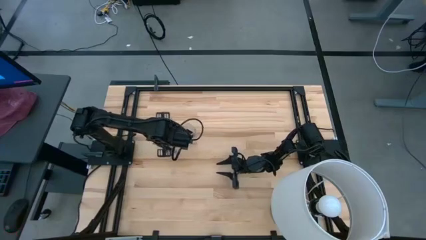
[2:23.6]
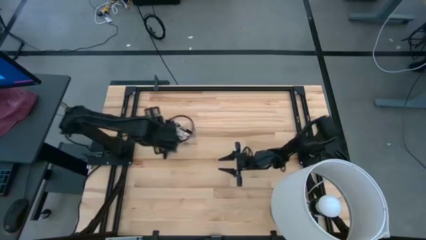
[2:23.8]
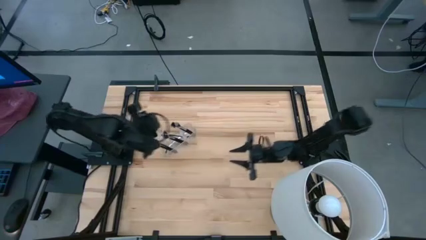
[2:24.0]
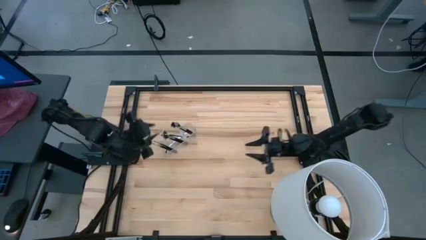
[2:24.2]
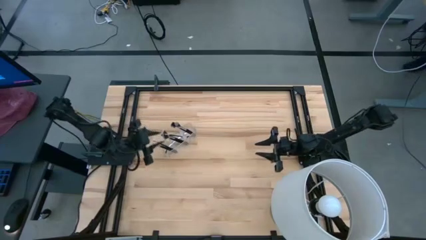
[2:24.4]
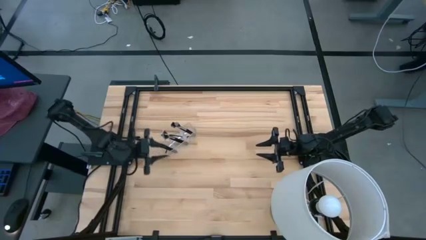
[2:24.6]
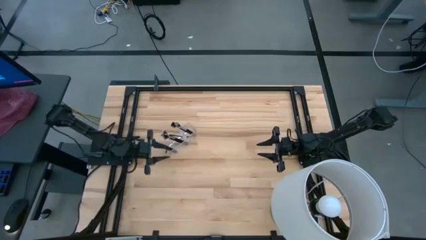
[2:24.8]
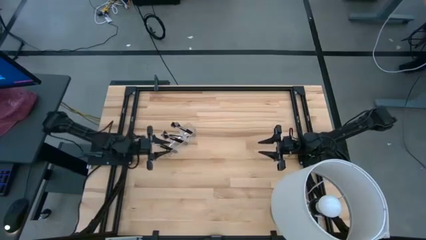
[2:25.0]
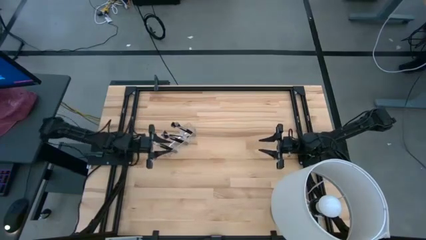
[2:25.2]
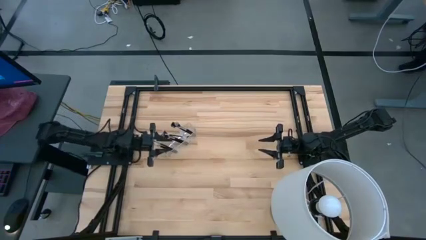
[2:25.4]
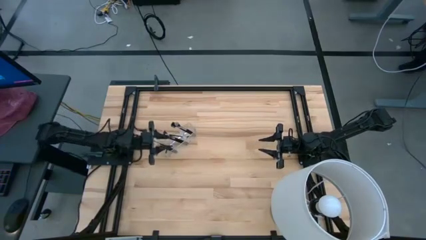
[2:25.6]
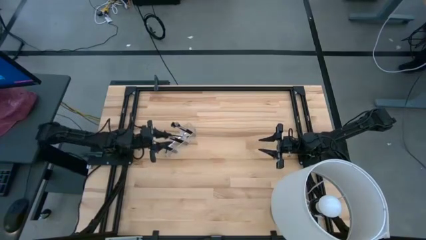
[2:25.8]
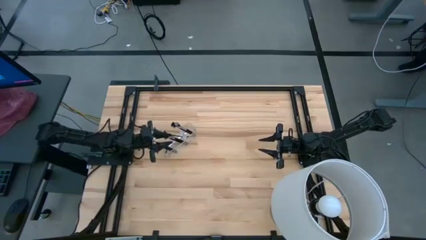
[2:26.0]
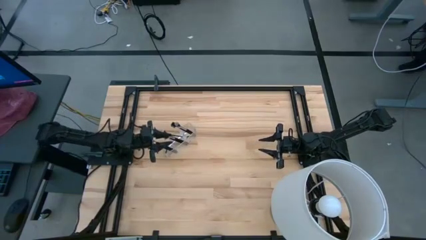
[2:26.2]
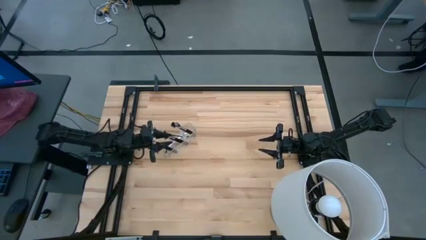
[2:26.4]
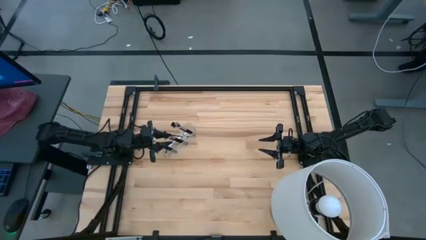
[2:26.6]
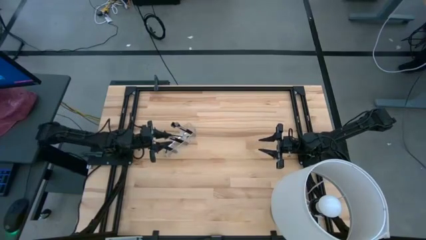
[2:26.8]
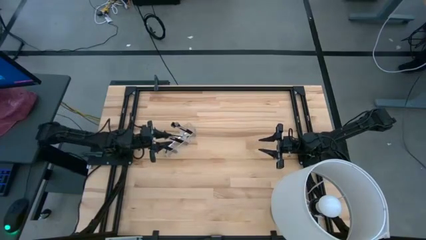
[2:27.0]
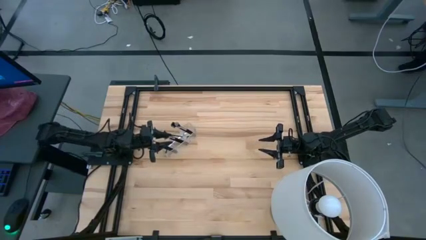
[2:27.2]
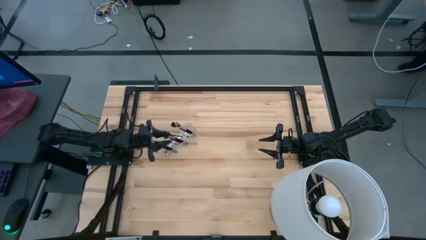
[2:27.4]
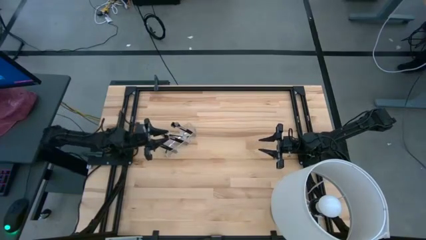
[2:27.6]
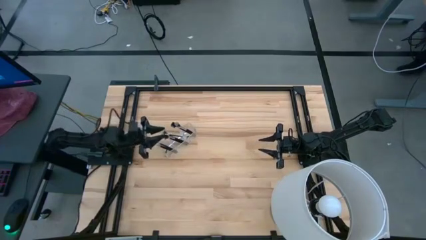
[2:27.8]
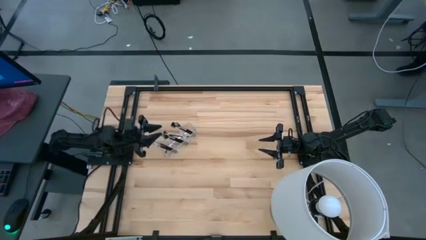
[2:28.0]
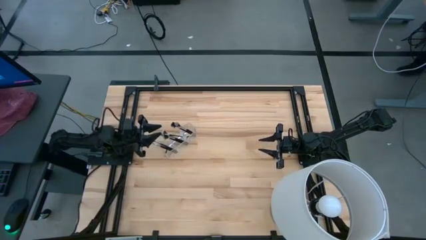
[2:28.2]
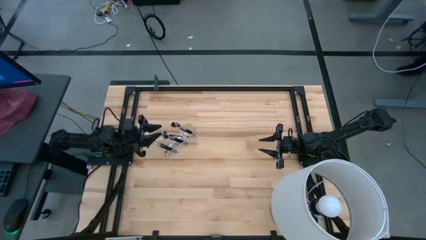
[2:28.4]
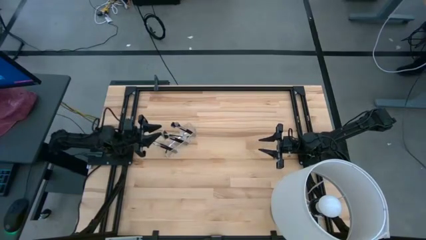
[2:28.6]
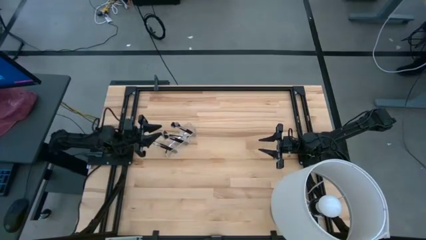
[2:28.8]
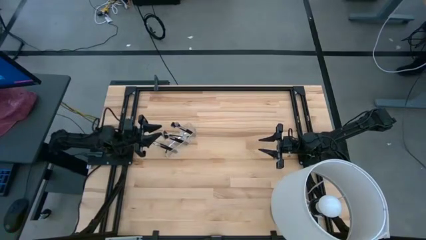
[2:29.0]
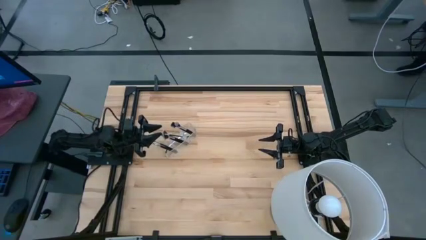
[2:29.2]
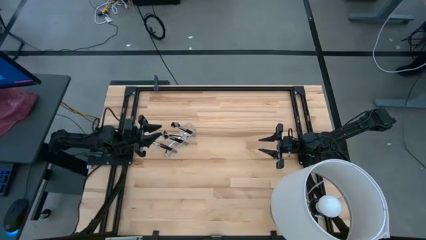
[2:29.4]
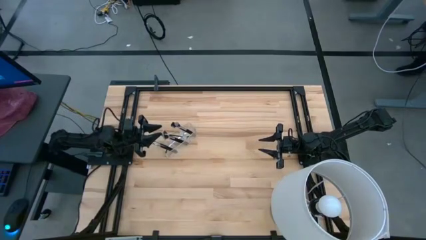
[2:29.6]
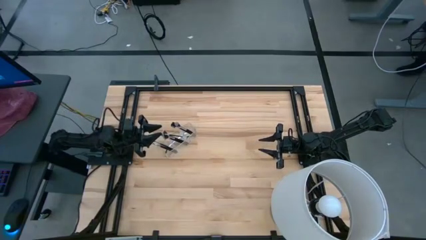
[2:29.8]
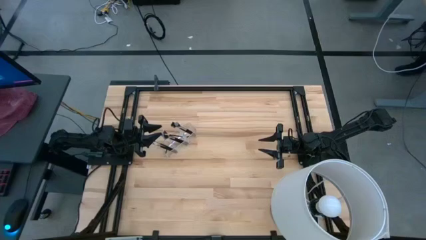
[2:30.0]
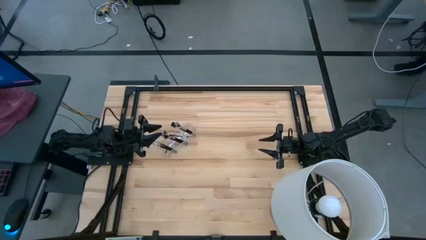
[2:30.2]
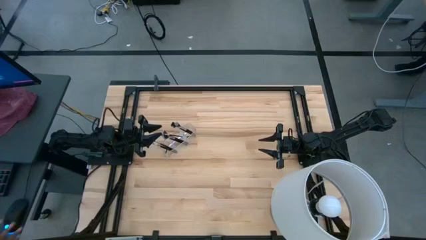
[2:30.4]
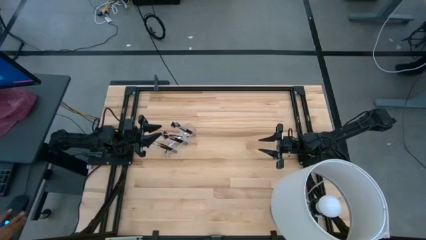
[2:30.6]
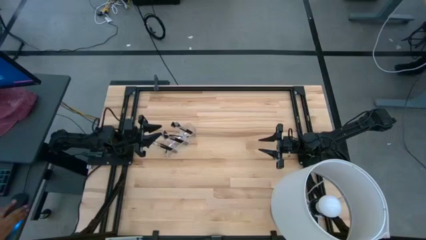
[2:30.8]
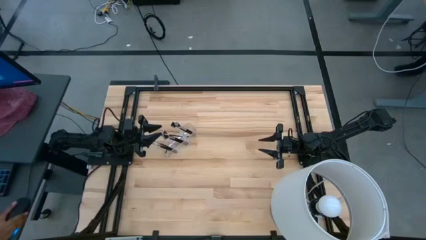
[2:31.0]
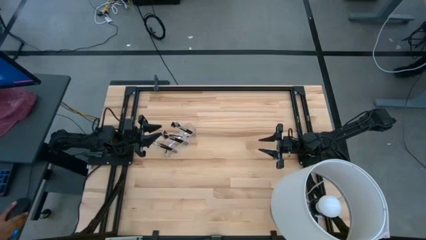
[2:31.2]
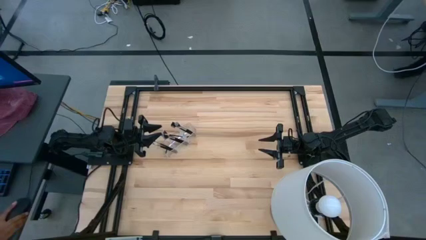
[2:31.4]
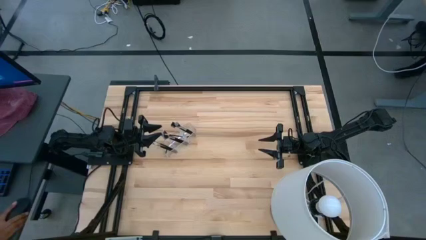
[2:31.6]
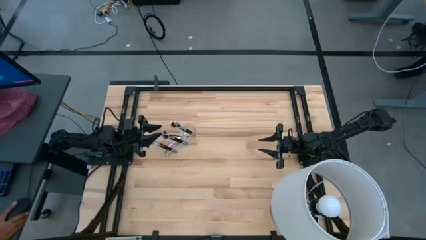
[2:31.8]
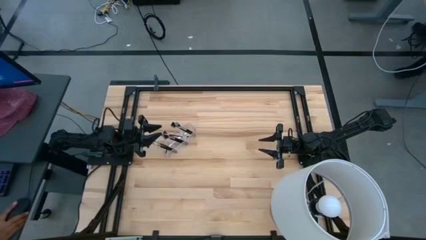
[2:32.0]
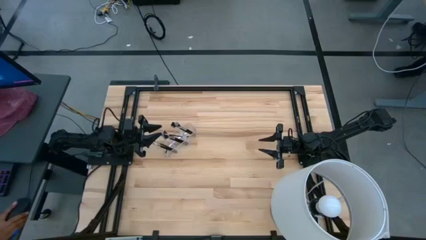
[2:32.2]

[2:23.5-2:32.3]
Task: Put items in baskets/containers
Return to home position

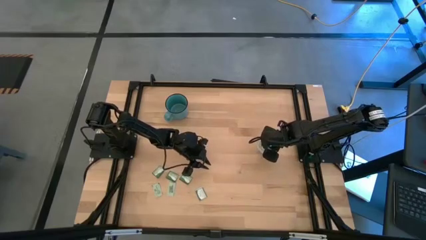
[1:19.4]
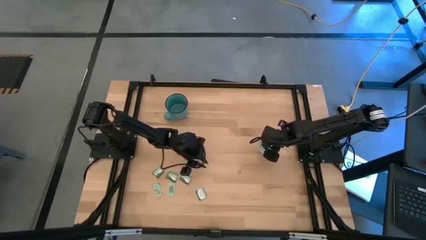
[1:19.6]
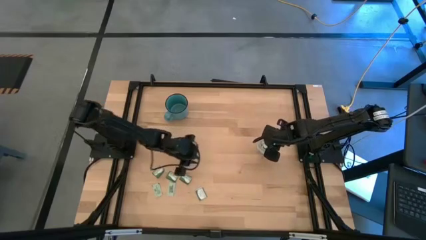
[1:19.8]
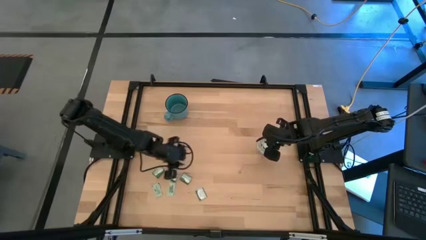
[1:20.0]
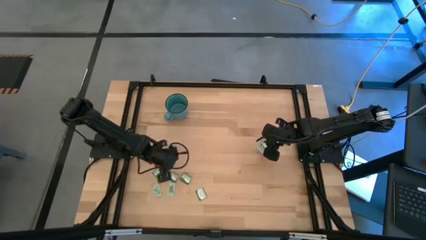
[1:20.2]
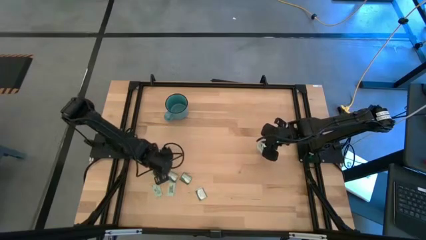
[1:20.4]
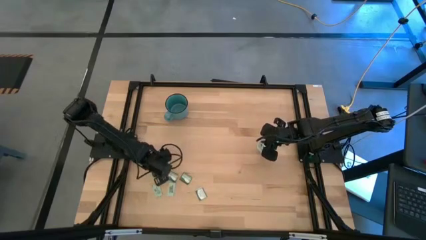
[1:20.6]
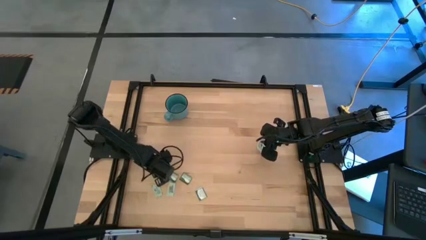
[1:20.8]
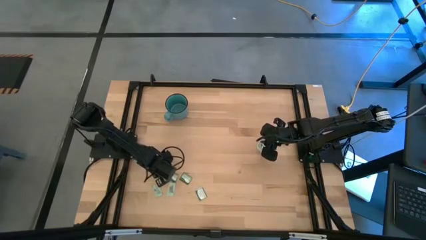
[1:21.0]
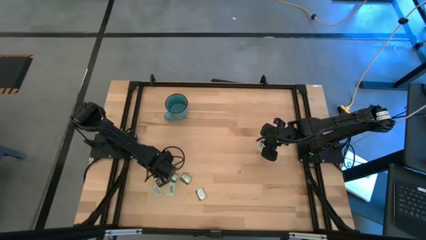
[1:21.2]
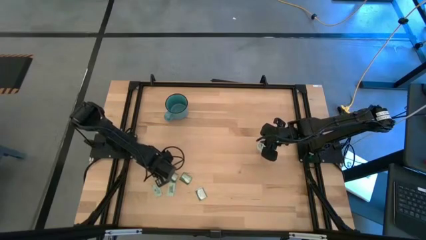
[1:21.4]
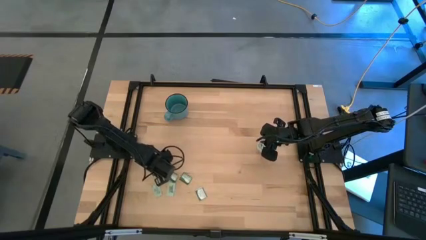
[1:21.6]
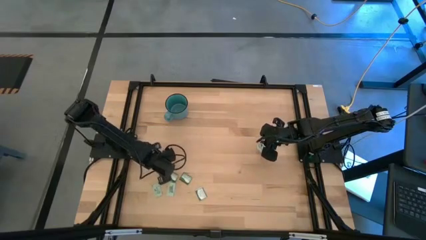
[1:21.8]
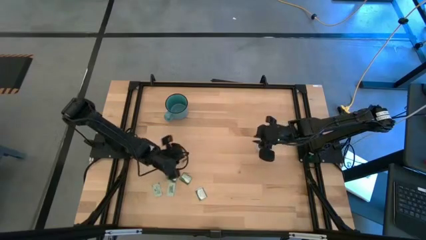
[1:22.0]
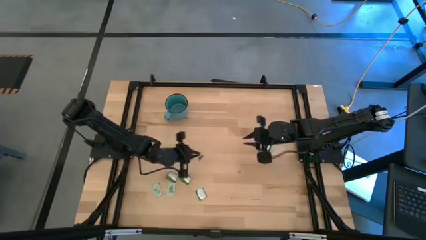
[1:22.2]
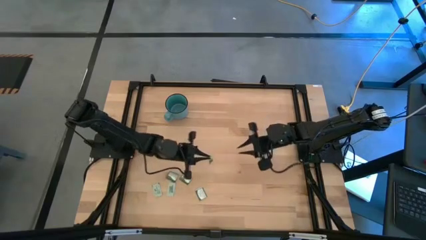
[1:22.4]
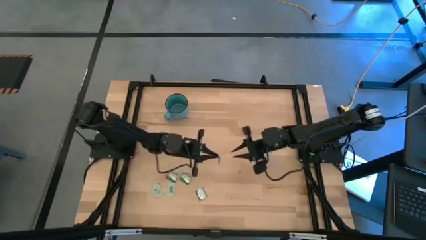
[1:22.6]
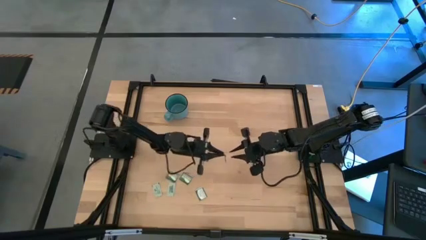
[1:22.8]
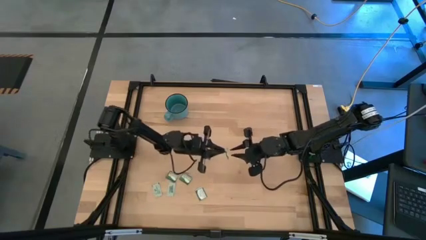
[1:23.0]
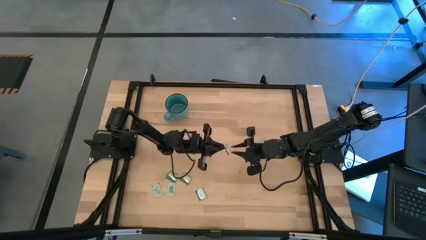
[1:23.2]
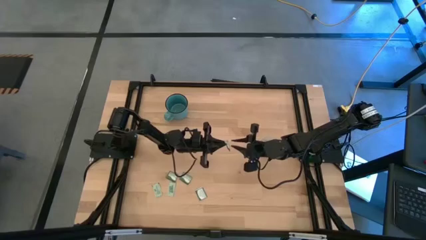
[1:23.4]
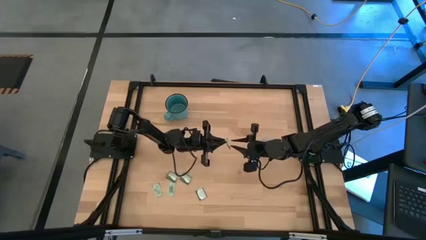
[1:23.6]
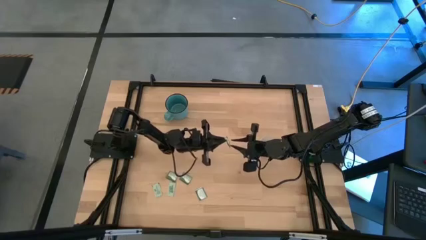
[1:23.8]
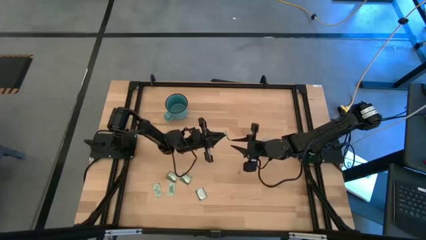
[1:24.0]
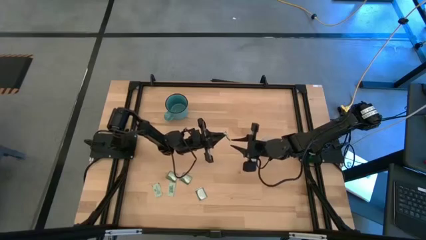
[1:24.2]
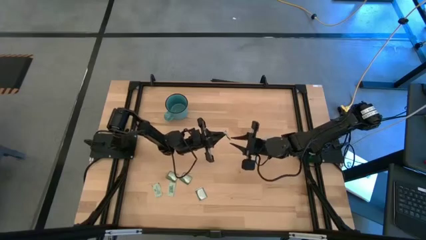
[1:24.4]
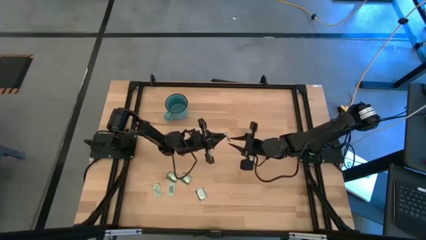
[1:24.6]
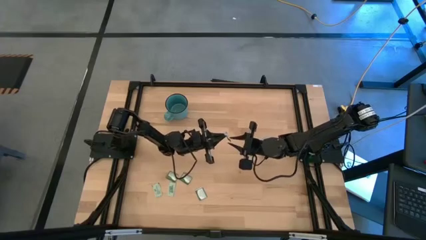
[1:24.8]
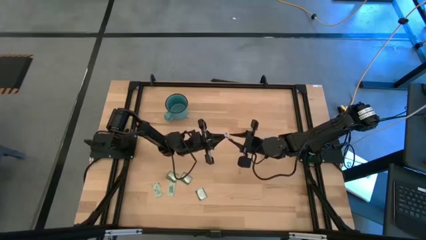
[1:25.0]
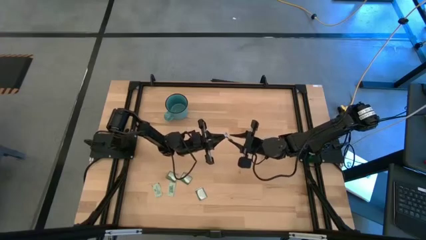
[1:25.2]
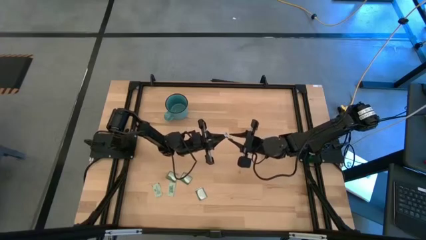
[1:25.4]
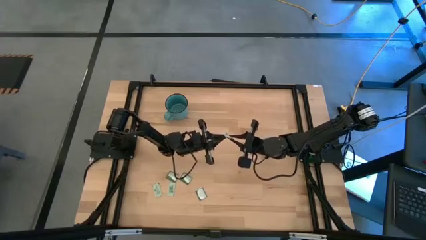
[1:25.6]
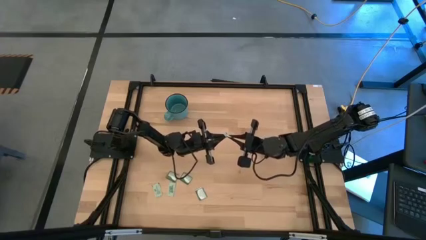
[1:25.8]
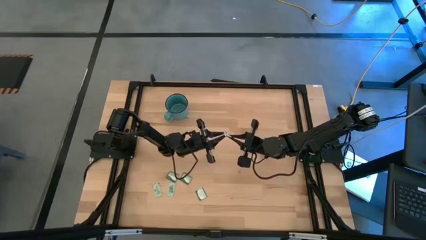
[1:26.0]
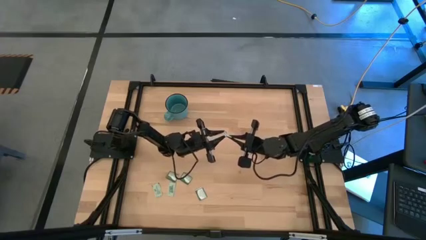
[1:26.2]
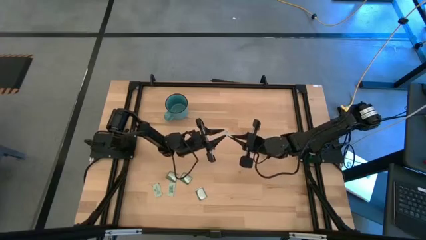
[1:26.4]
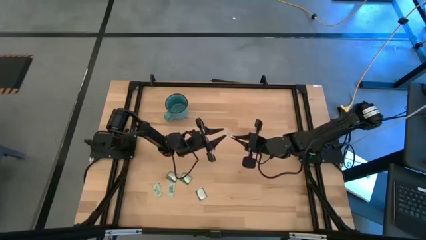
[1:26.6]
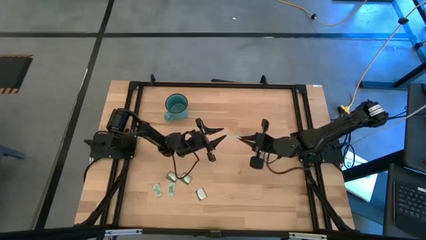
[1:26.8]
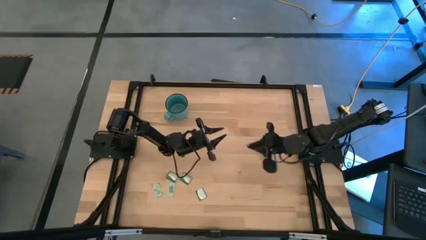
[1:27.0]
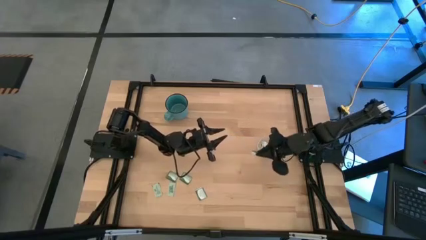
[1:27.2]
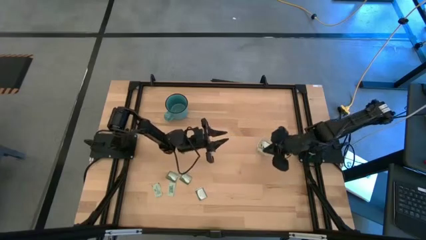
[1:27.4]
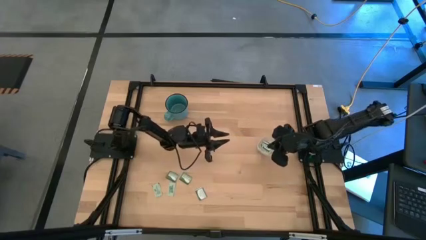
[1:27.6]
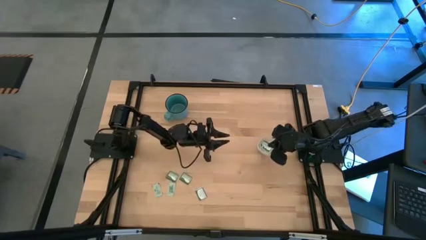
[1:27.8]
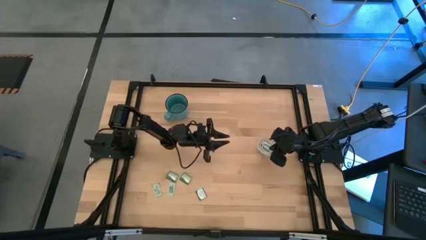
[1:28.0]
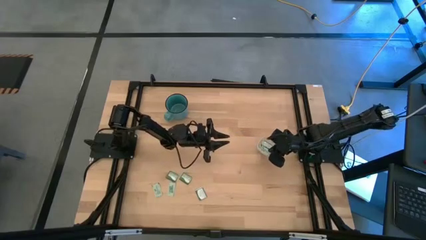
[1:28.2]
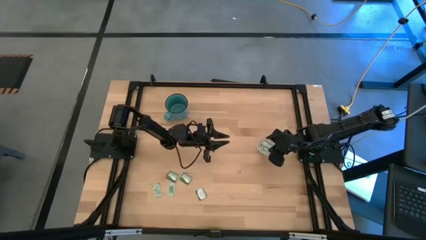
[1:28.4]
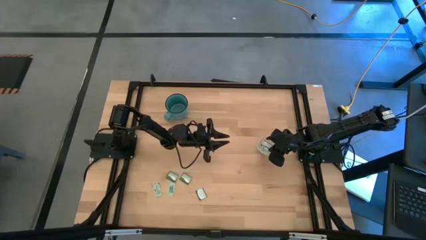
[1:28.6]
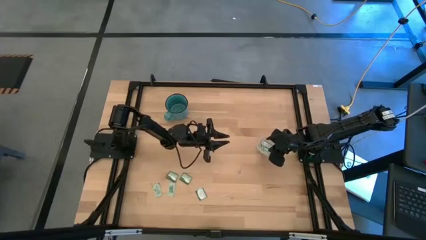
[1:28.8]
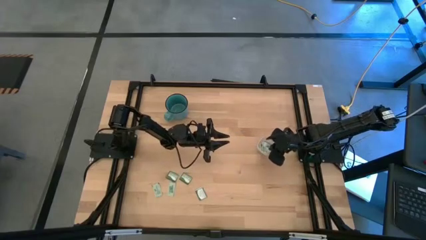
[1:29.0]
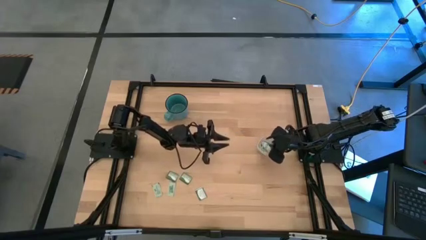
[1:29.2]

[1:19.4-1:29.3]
Task: Pick and place Stevia / Truvia into bins
Put the truvia packet into the transparent bin
